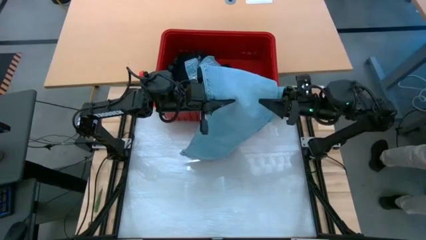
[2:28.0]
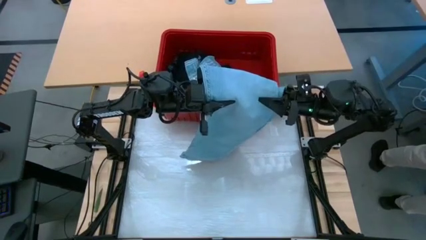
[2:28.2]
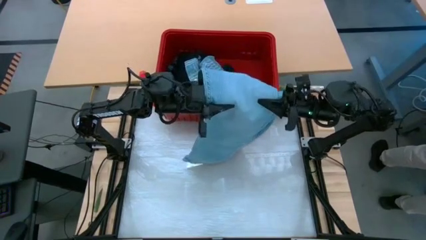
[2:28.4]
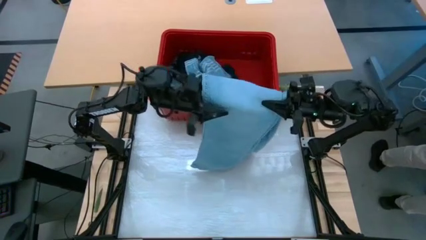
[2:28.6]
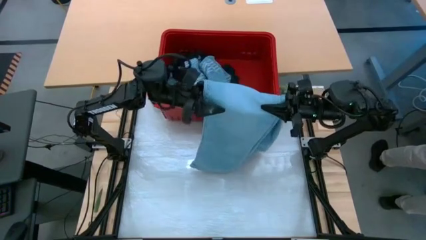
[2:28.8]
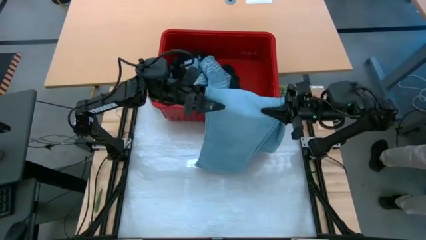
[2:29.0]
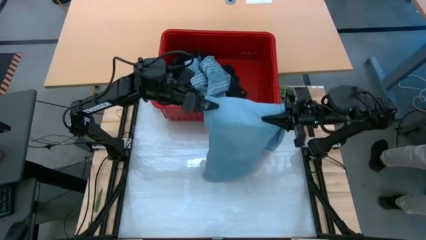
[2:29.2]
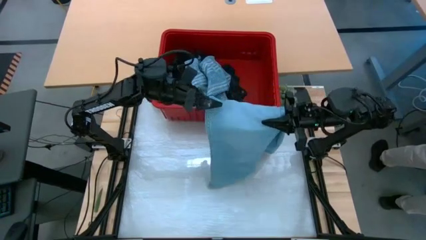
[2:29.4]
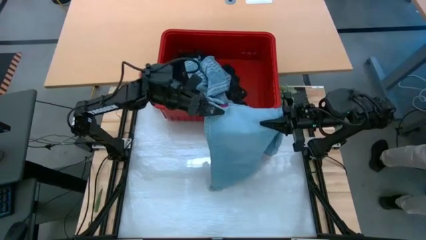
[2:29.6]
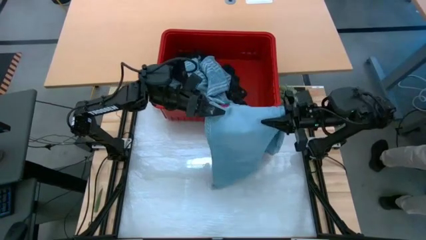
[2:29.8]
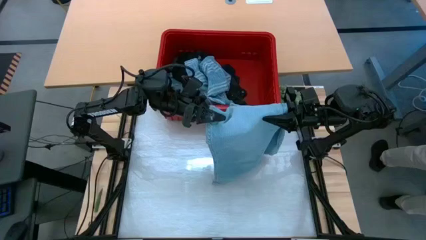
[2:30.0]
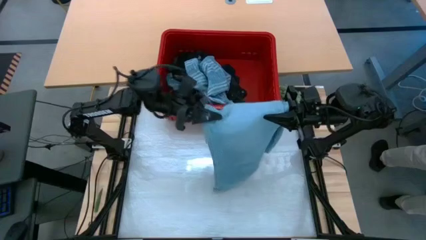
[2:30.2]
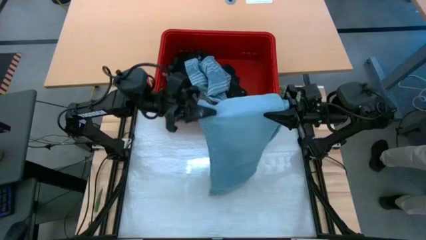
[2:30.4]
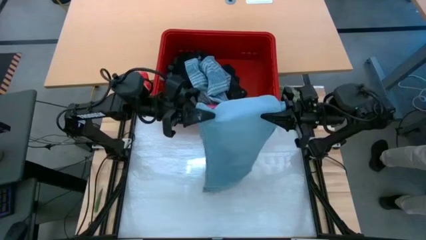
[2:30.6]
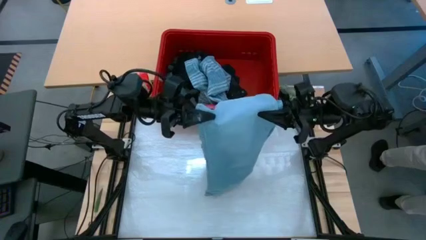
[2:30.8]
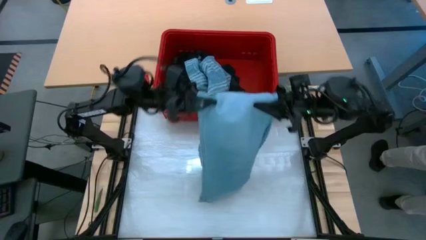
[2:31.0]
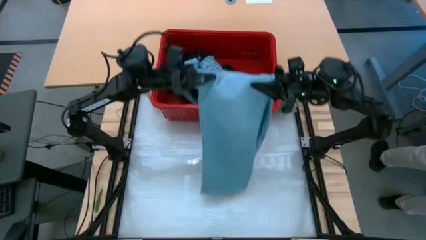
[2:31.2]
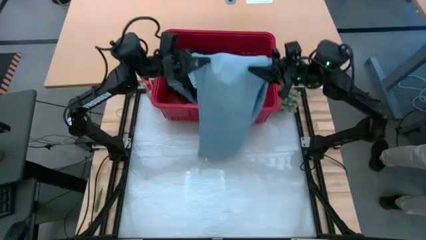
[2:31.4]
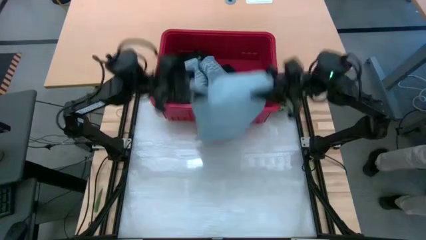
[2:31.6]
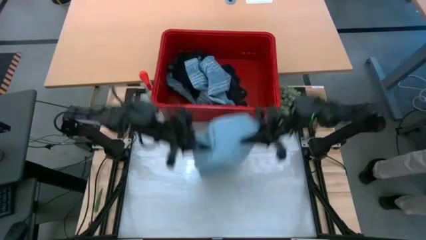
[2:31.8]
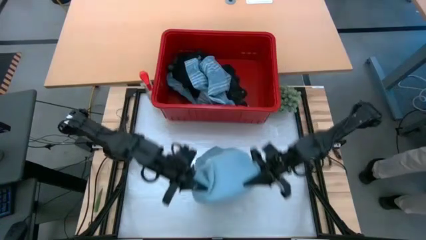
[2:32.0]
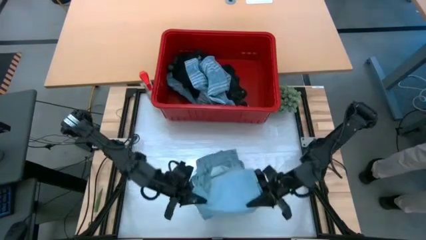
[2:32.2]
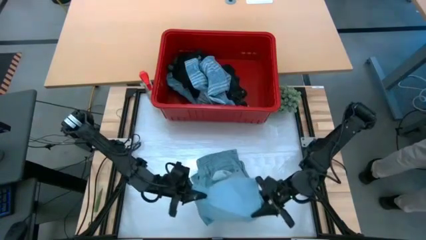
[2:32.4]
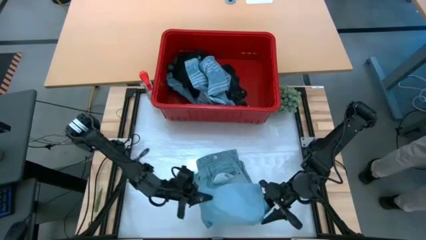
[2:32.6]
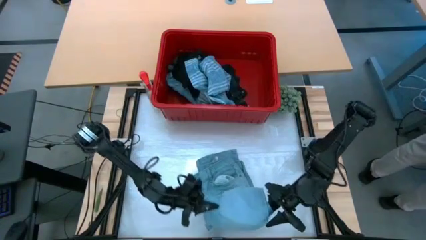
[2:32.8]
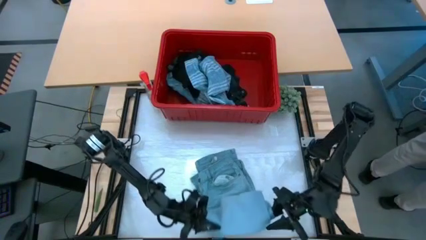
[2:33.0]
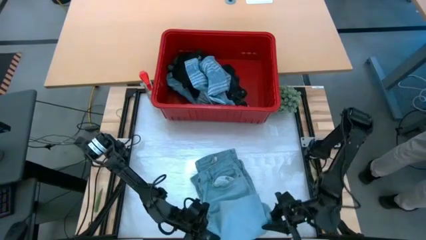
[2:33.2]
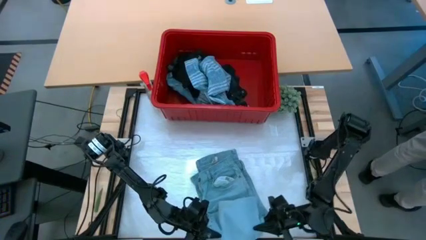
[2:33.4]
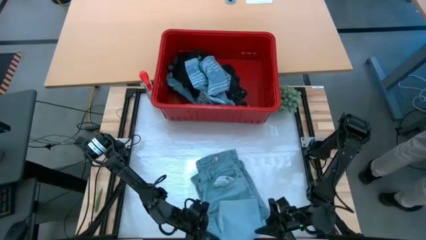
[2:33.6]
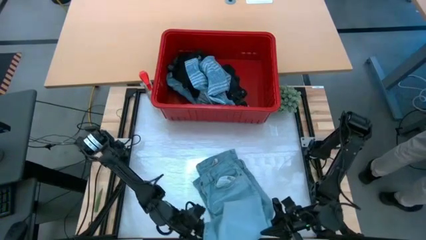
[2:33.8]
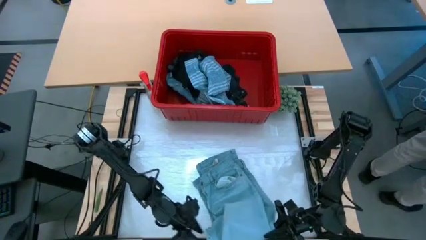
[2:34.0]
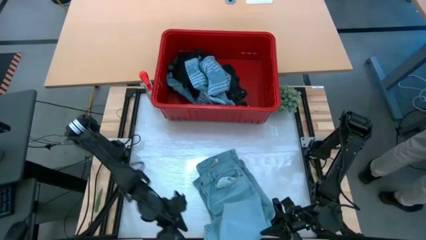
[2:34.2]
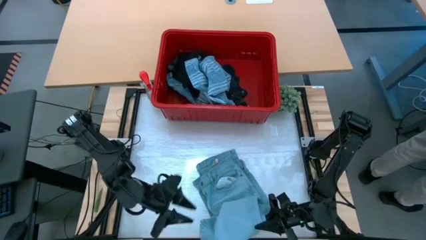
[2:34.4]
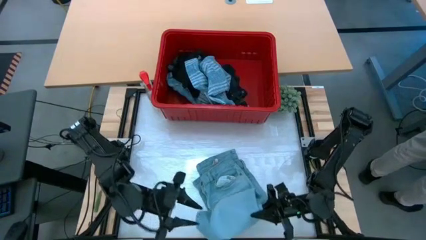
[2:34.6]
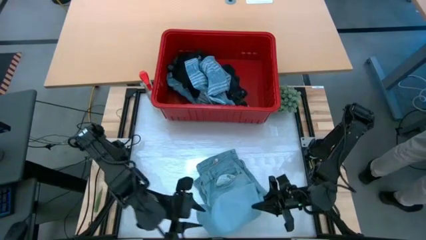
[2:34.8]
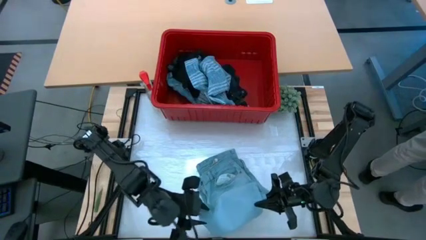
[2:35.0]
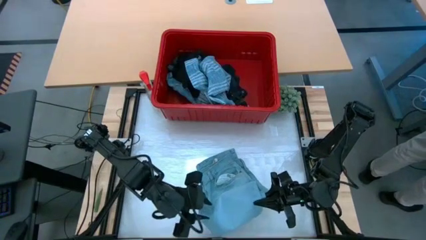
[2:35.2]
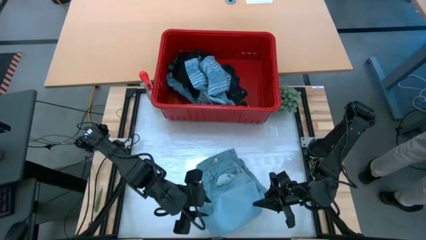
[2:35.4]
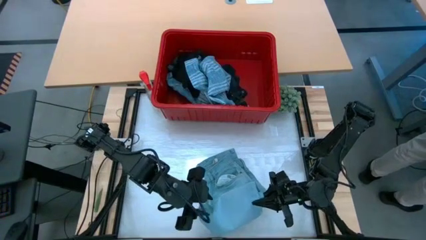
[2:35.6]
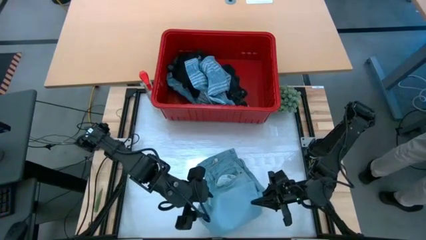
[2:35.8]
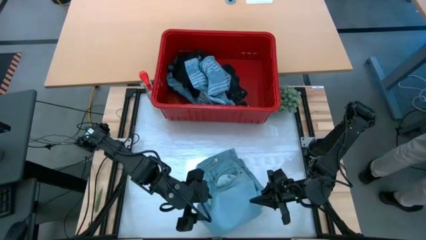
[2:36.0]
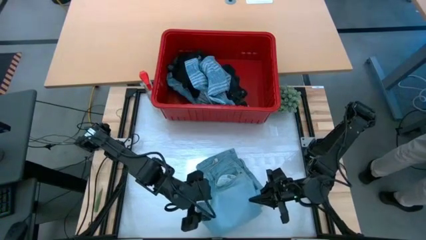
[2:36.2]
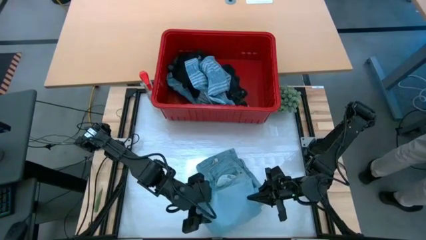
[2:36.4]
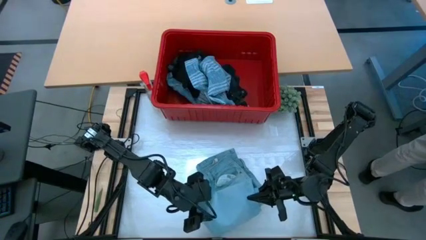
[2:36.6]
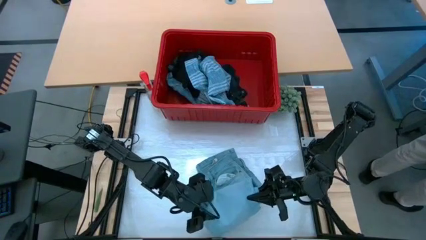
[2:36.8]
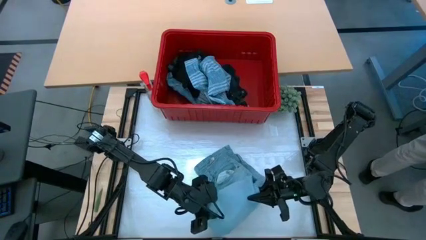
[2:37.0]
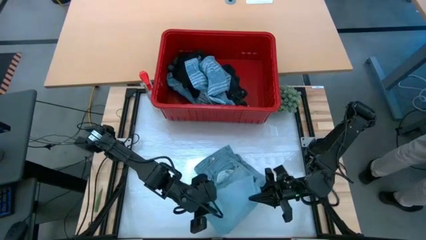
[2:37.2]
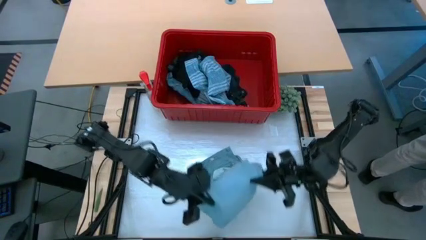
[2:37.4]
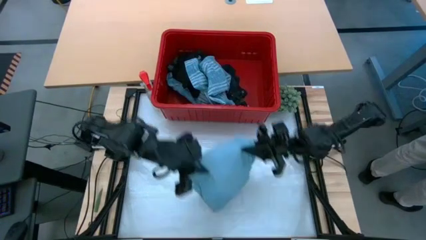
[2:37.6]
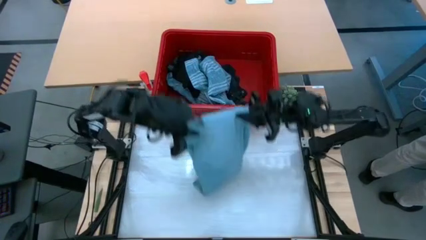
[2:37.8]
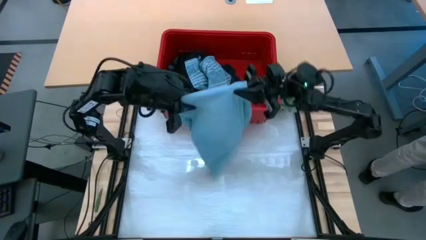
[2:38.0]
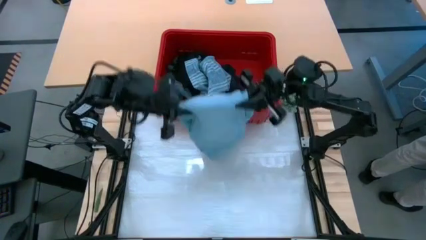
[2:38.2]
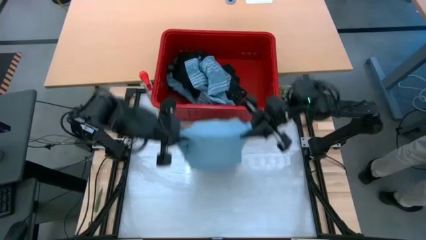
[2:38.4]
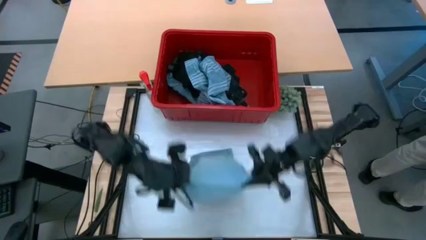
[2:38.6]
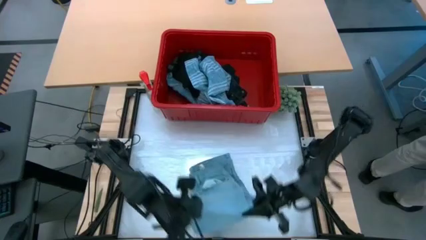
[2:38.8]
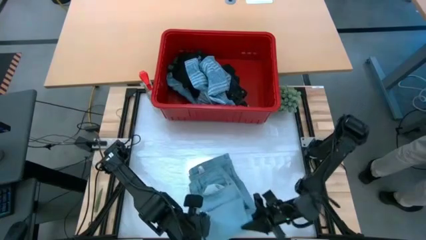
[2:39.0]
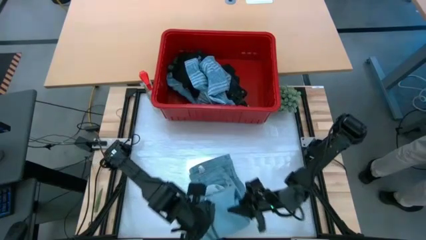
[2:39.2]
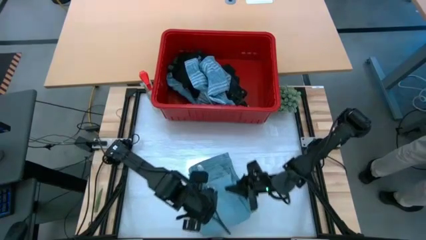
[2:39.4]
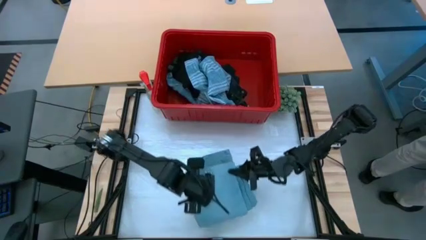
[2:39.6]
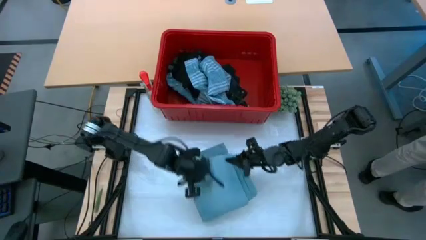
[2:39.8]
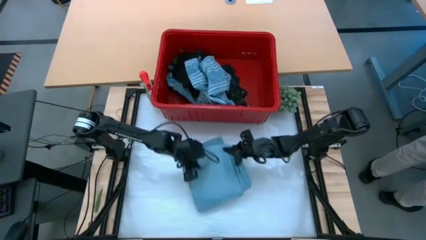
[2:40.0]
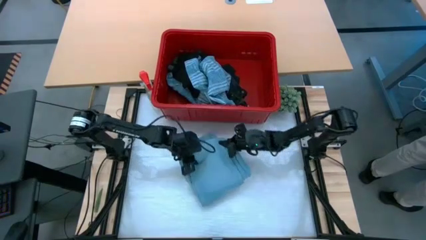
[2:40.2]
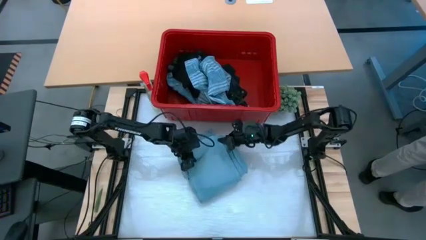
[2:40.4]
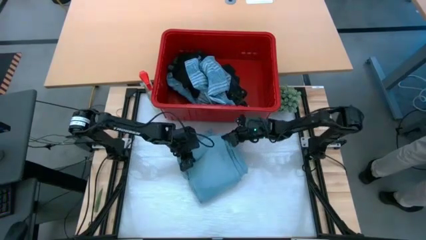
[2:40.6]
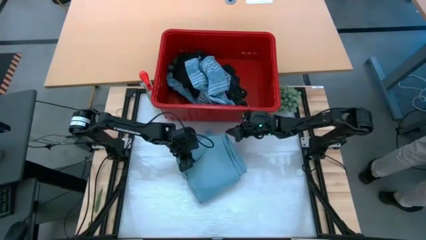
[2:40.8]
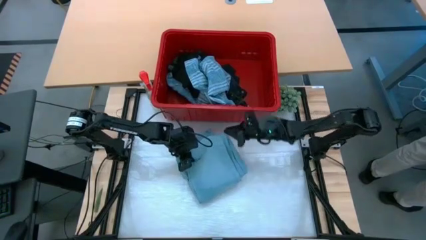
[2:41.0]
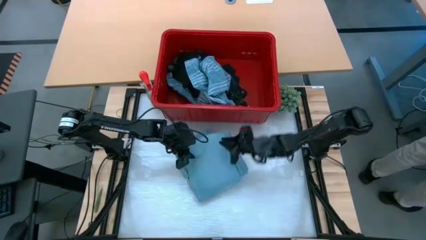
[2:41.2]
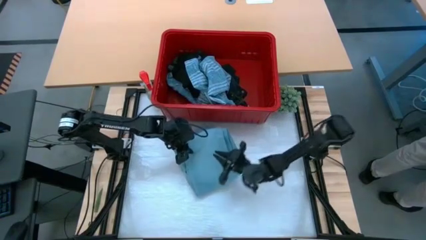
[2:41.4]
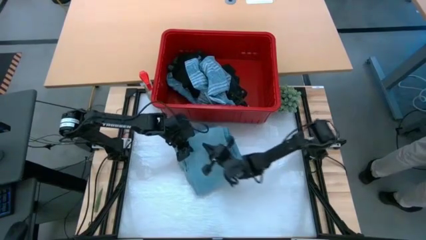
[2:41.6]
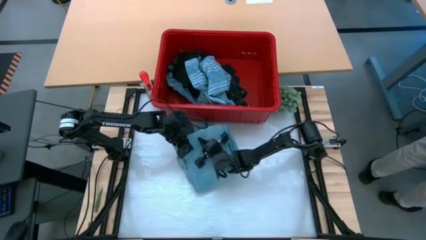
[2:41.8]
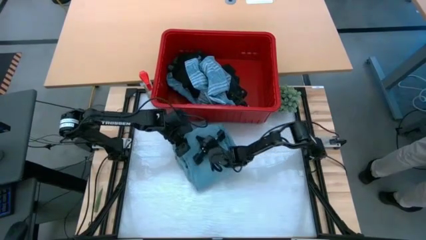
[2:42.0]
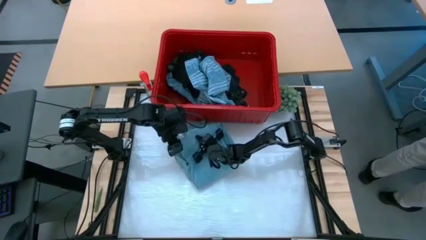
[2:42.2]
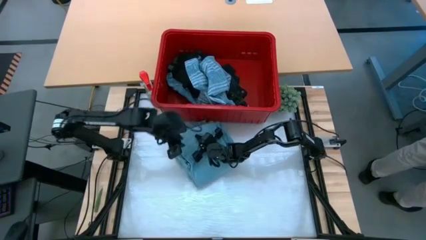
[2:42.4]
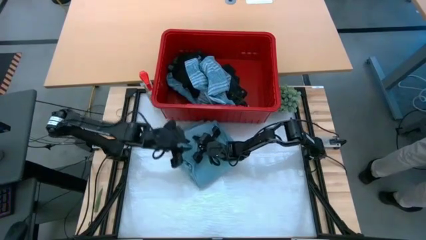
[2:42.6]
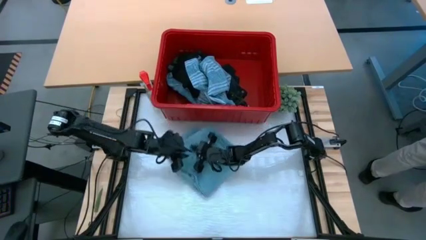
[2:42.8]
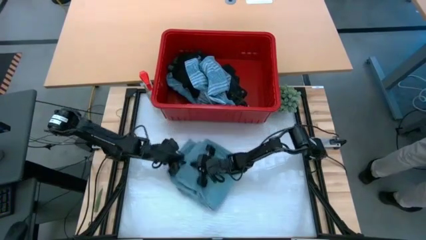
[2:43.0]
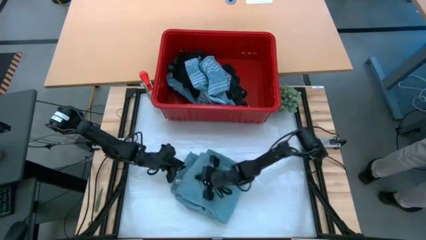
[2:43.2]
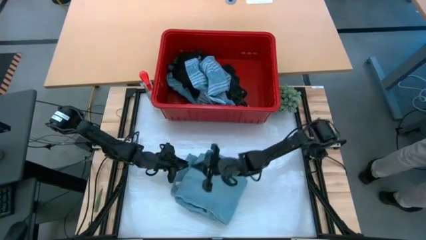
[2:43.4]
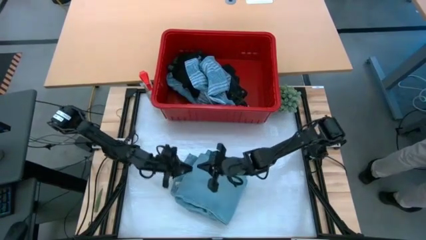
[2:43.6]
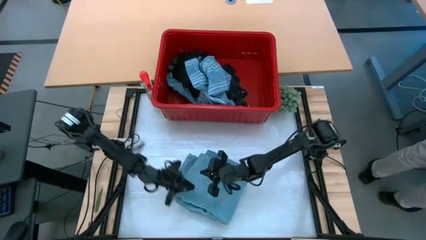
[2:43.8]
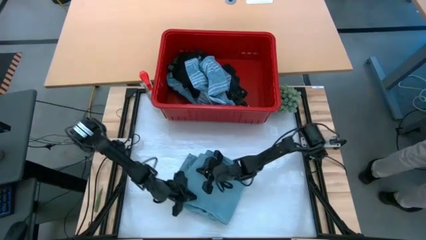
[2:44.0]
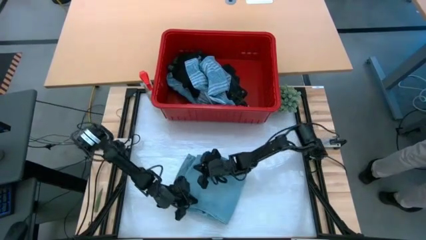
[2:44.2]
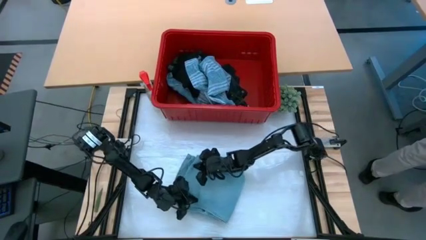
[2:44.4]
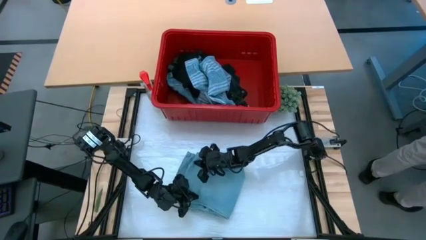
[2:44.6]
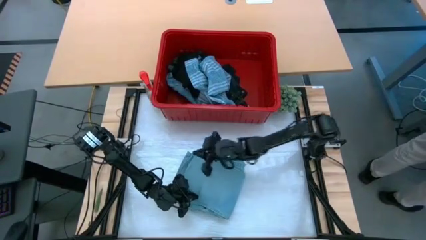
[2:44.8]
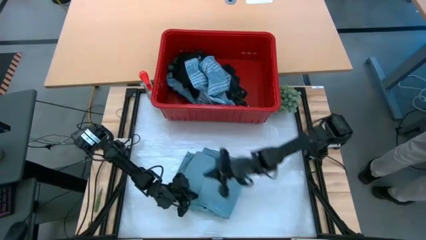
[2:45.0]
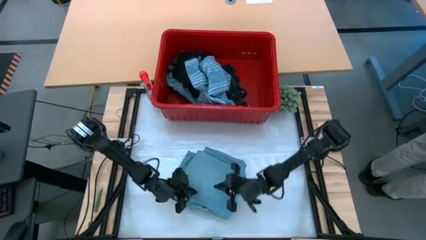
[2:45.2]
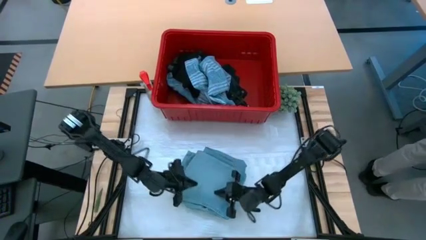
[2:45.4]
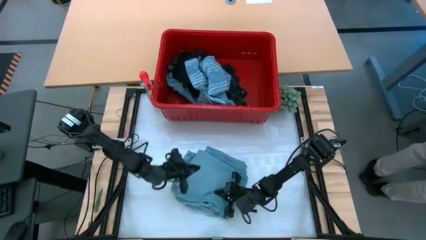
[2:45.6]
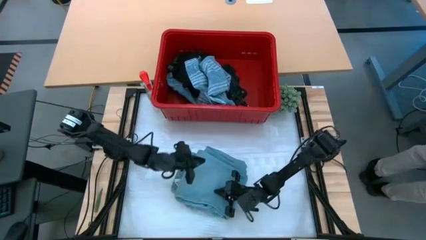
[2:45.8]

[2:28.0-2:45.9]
Task: Fold Laundry from Bin
Fold the light blue pants
